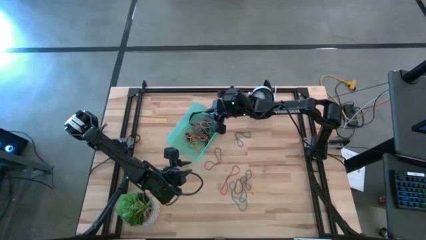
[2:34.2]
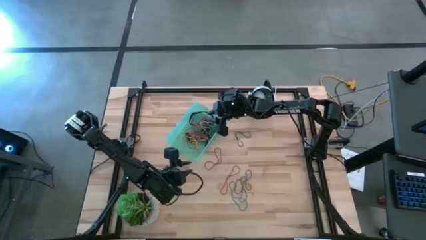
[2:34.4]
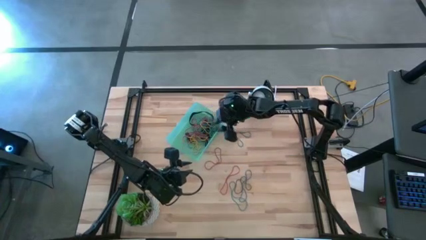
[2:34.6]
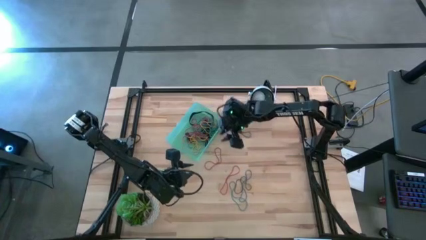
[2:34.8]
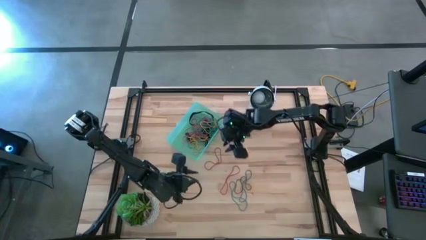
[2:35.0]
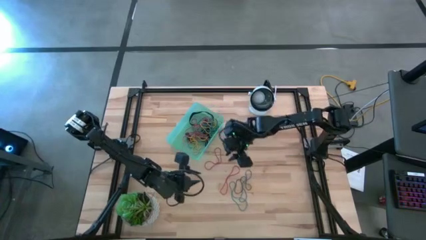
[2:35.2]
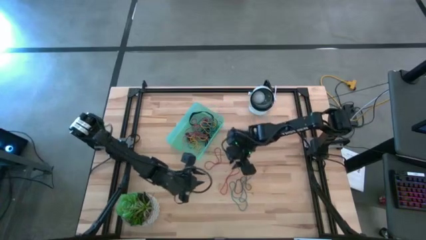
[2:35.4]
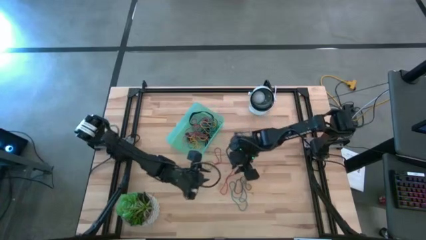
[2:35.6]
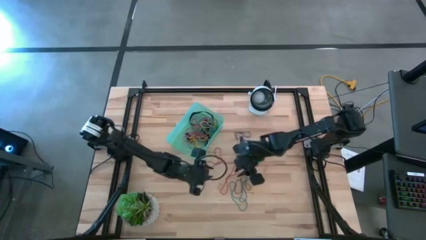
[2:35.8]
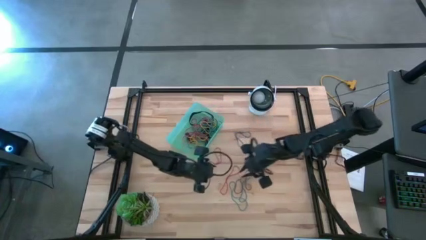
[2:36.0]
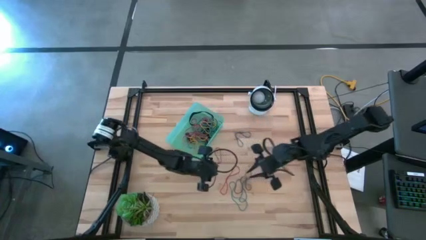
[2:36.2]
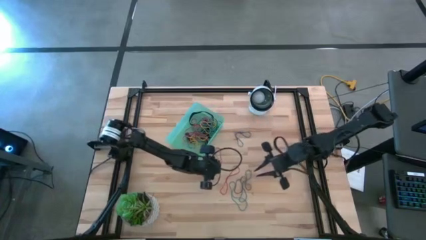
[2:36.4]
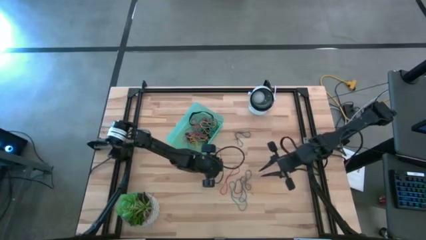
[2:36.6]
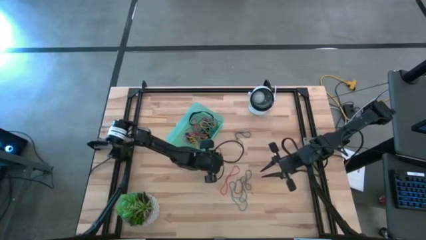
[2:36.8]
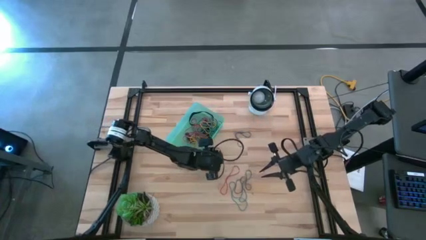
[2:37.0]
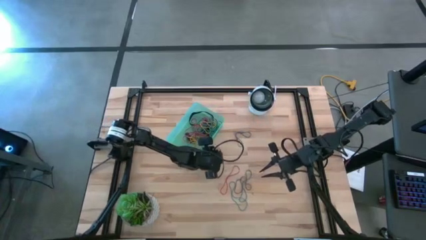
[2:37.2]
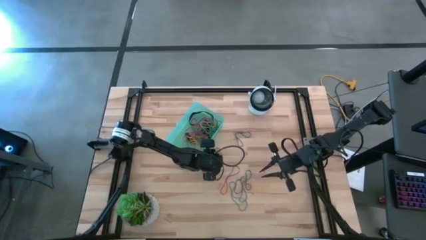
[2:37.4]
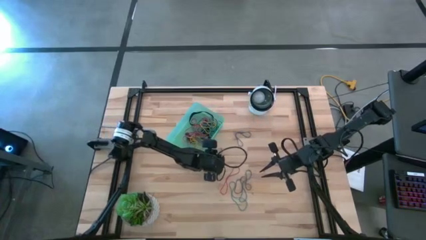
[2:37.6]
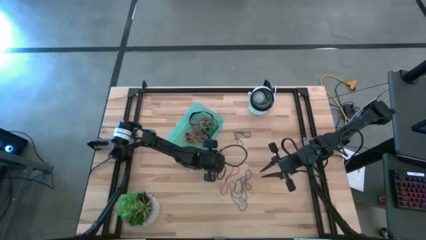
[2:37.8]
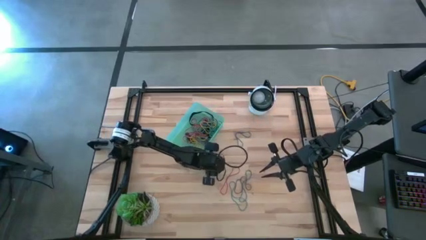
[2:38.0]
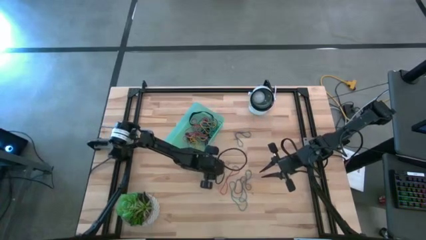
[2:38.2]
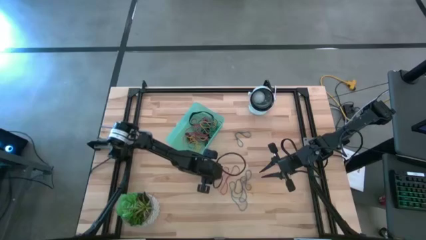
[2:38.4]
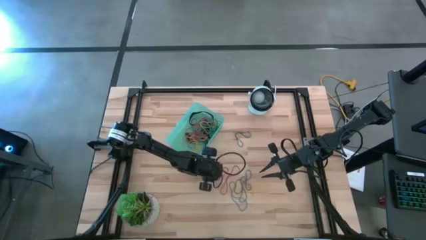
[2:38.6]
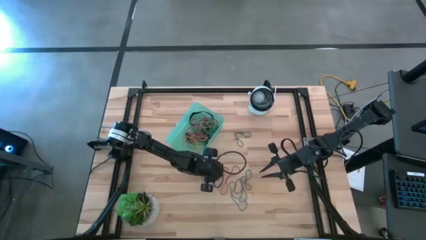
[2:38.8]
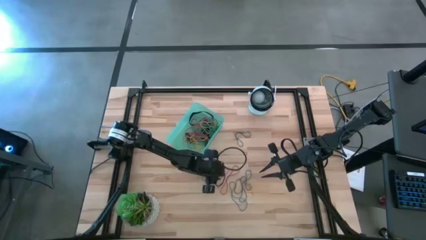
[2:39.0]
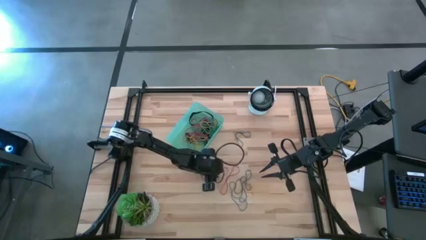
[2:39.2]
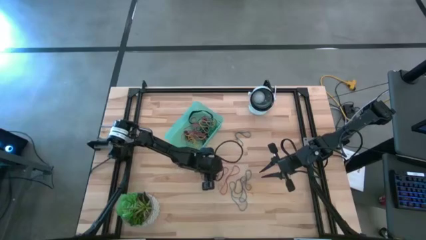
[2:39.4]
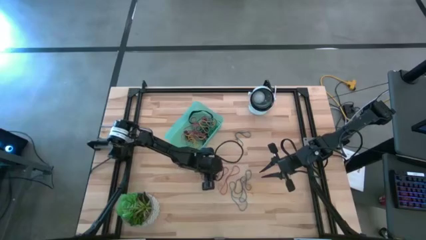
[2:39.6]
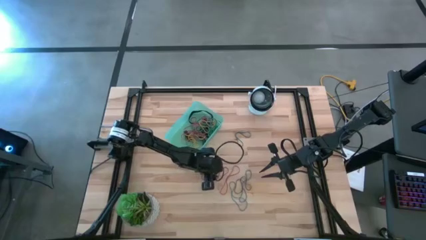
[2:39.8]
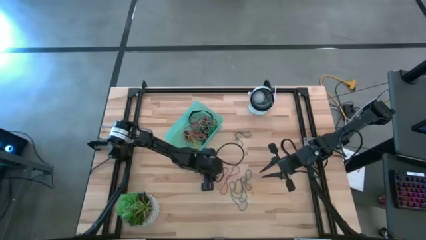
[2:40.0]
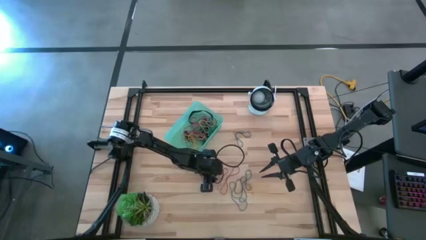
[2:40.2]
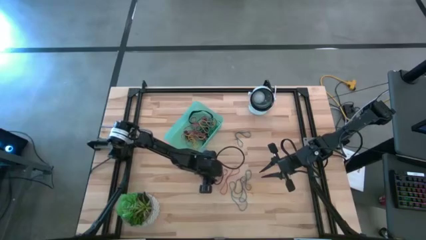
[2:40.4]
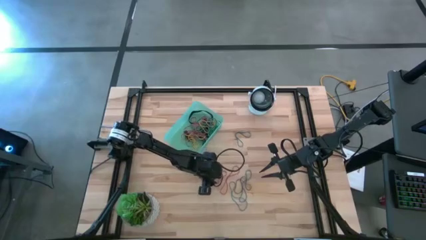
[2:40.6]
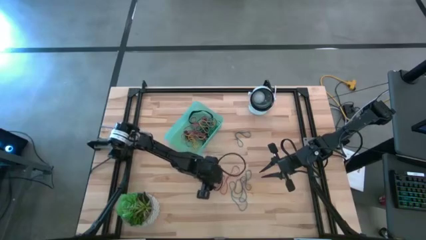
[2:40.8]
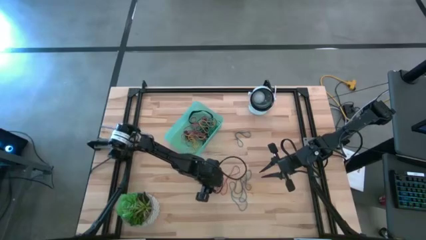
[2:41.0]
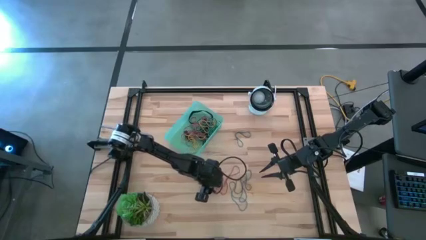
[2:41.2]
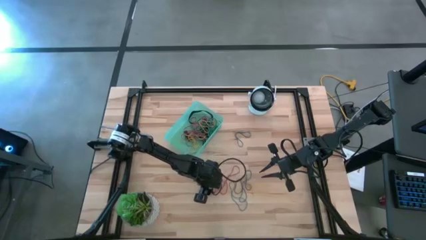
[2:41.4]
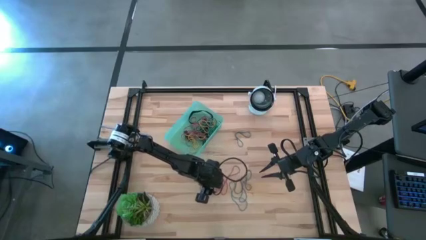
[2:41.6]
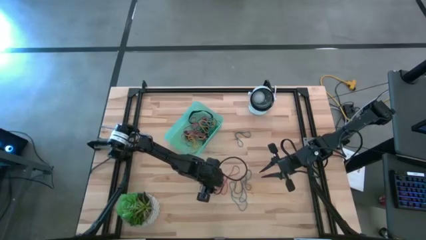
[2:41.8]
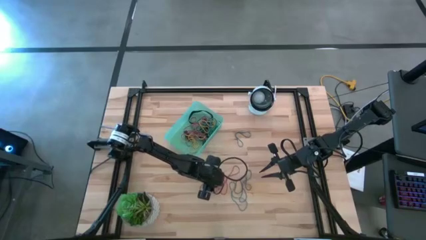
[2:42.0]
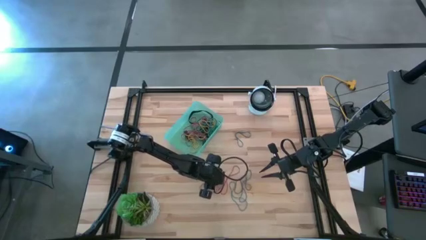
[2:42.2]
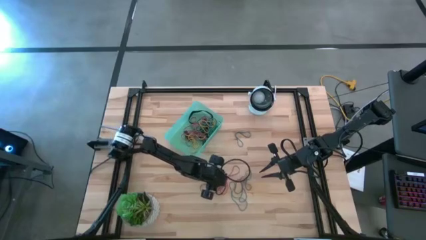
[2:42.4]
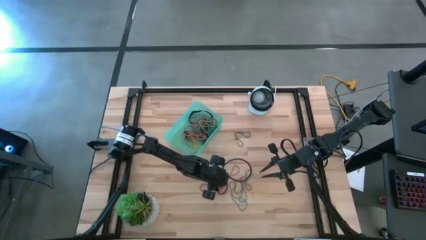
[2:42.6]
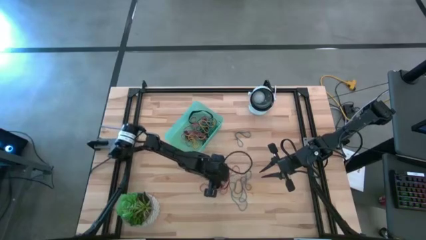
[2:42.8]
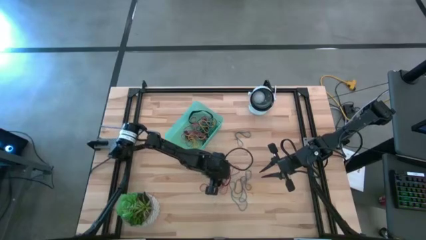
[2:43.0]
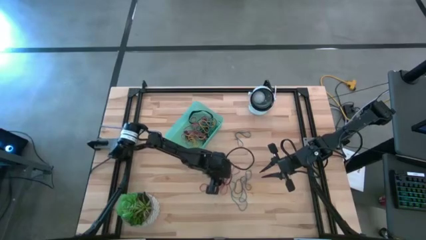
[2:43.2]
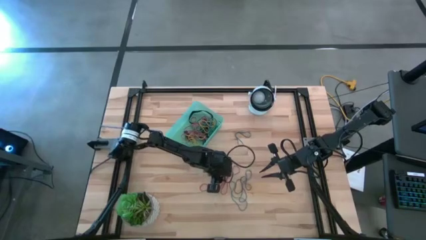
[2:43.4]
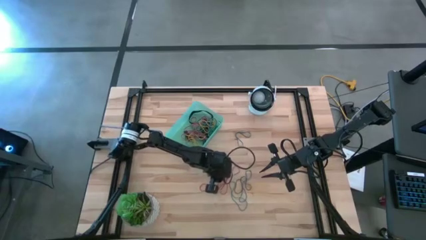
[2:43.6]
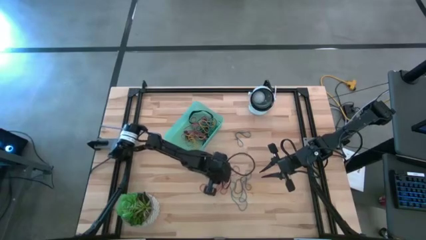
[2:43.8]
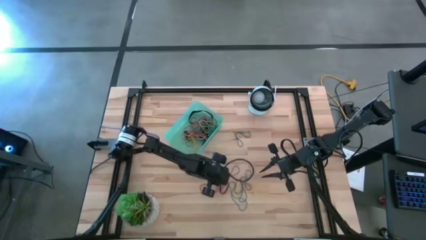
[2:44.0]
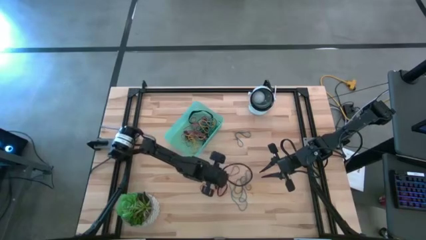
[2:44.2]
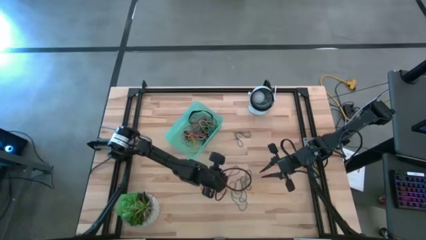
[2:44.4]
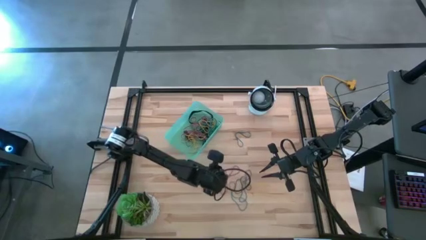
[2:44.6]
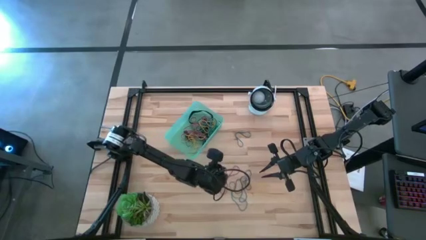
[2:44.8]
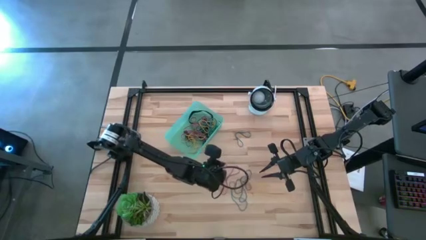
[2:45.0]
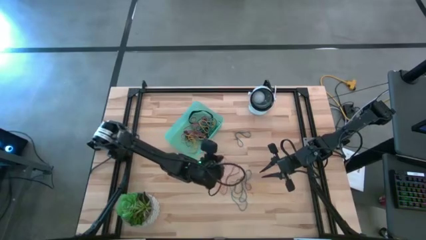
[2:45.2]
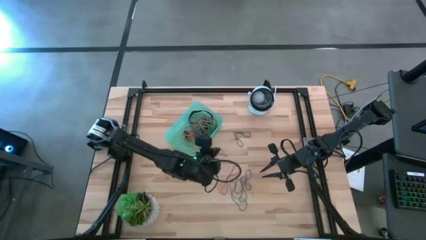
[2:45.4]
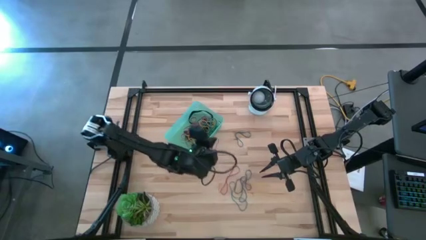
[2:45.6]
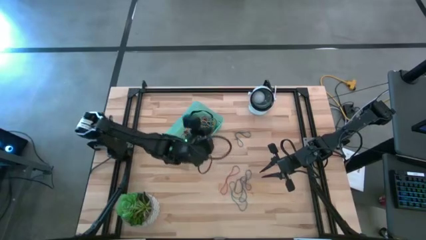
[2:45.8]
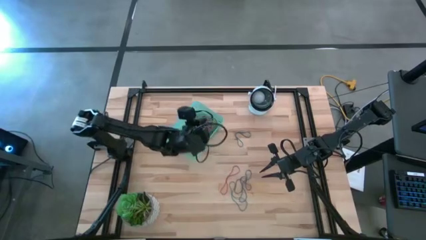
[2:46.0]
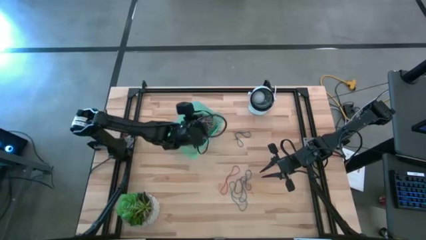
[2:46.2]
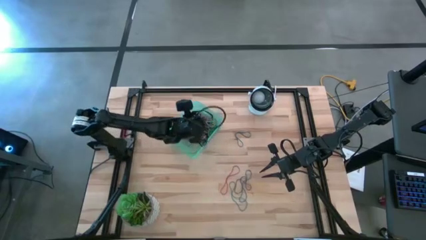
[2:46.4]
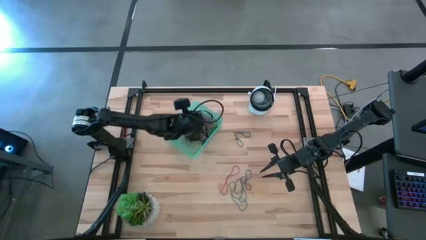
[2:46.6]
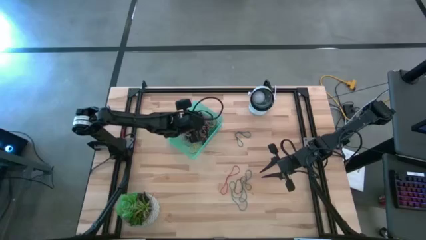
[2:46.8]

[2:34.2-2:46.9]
Task: Pick and place rubber bands into bin
Put the red rubber band into the green bin
